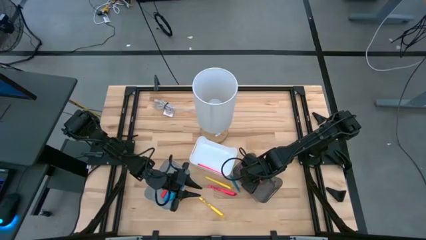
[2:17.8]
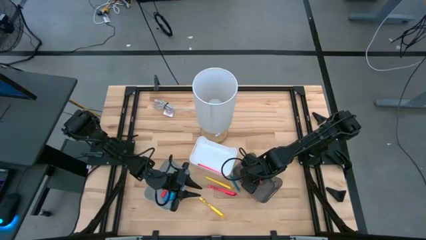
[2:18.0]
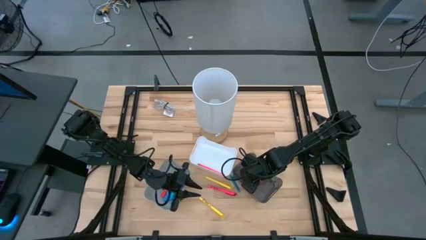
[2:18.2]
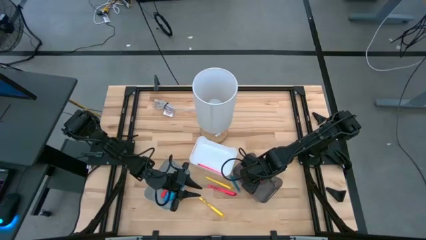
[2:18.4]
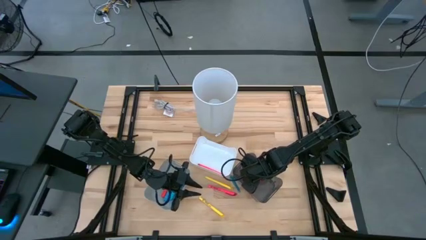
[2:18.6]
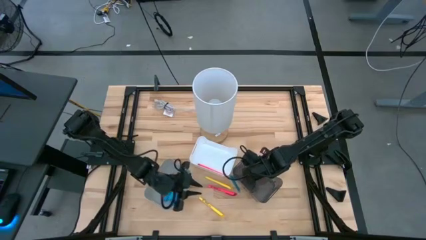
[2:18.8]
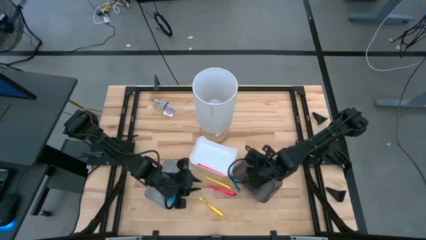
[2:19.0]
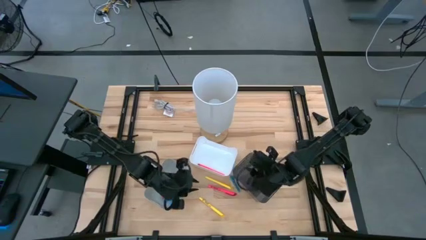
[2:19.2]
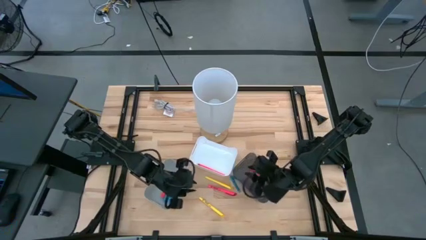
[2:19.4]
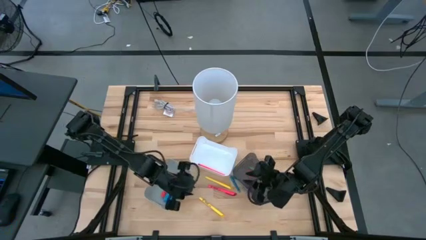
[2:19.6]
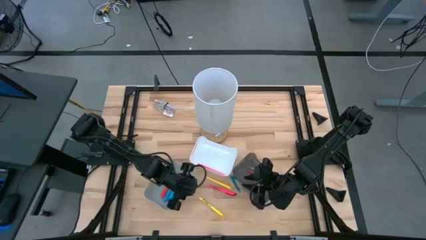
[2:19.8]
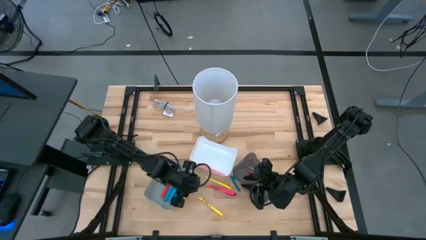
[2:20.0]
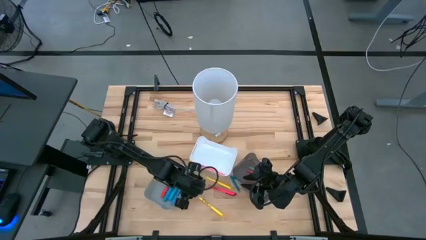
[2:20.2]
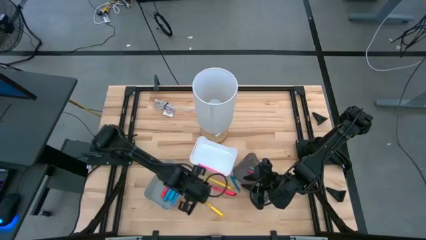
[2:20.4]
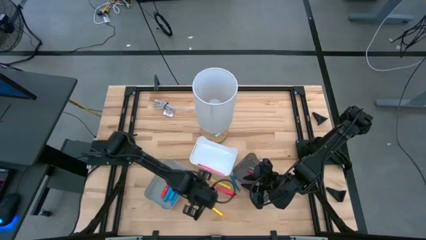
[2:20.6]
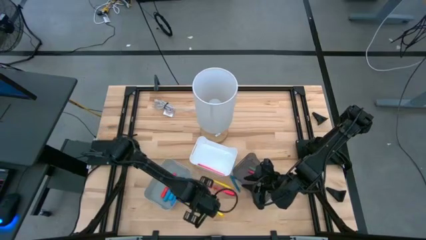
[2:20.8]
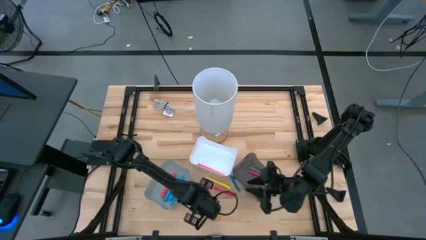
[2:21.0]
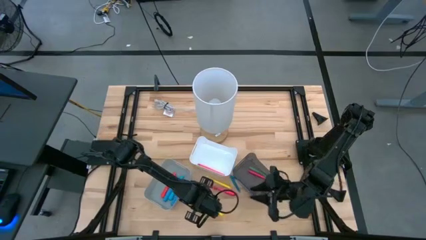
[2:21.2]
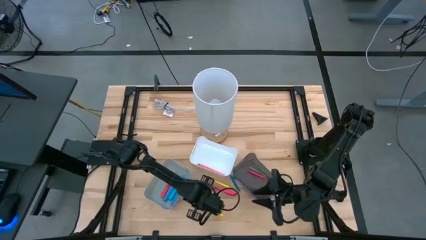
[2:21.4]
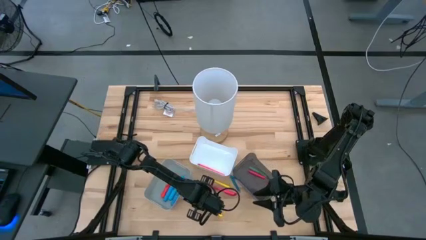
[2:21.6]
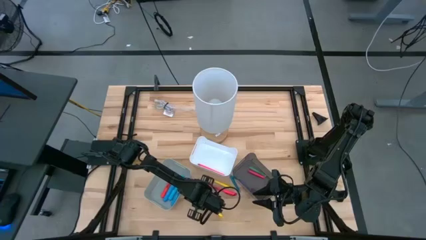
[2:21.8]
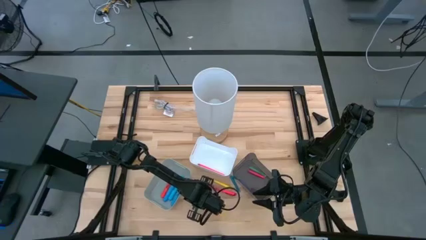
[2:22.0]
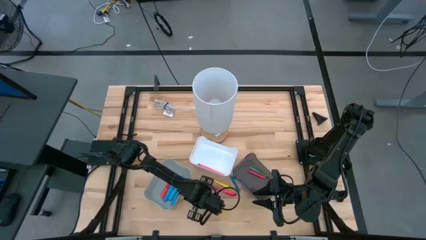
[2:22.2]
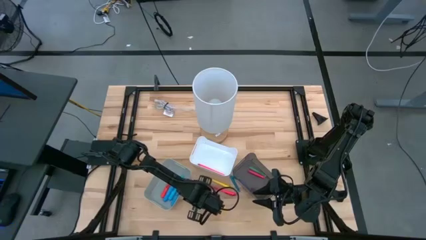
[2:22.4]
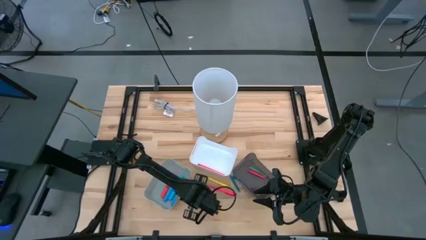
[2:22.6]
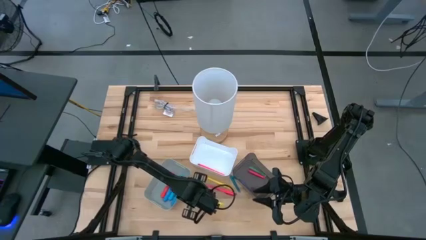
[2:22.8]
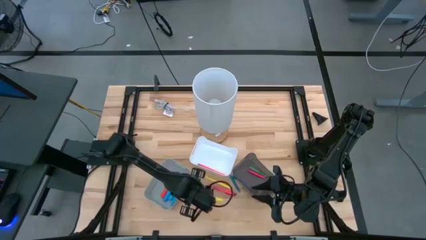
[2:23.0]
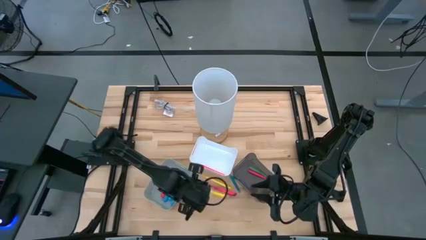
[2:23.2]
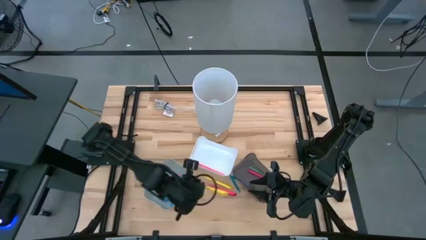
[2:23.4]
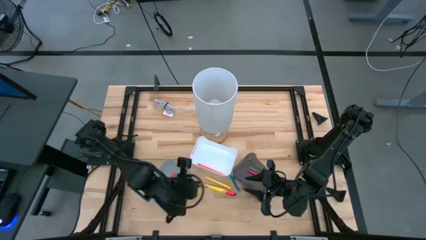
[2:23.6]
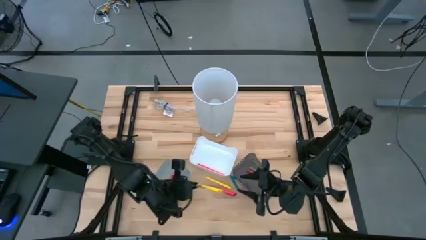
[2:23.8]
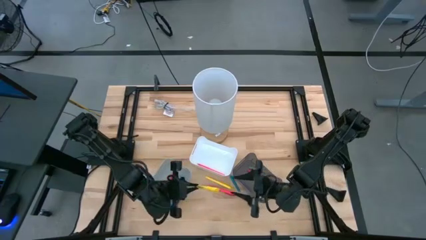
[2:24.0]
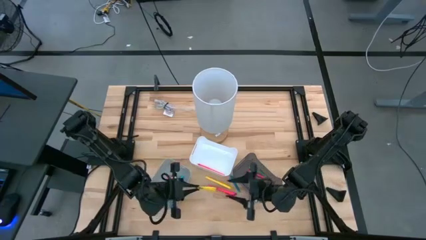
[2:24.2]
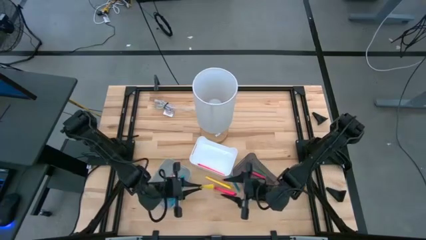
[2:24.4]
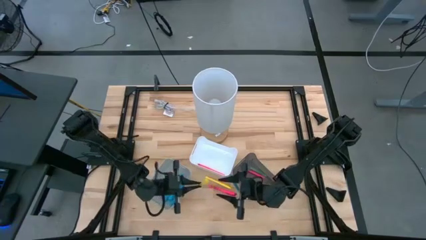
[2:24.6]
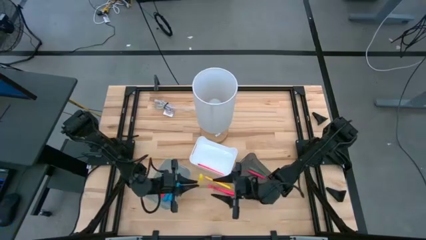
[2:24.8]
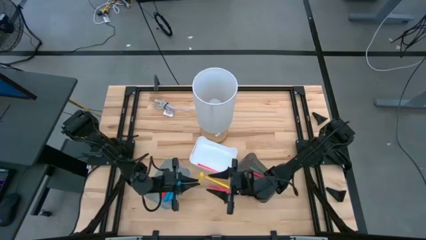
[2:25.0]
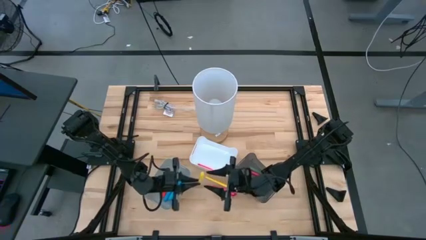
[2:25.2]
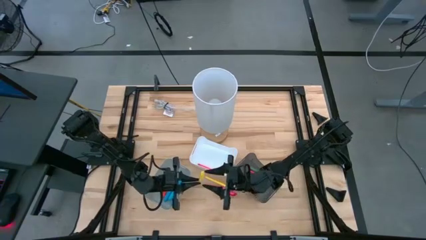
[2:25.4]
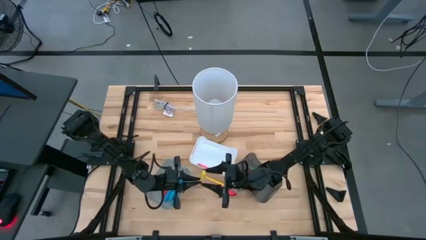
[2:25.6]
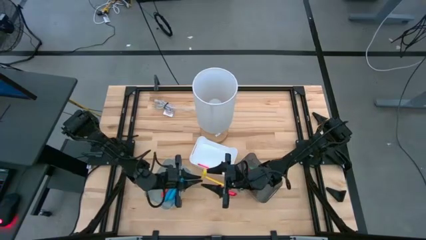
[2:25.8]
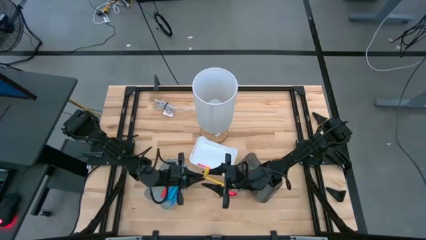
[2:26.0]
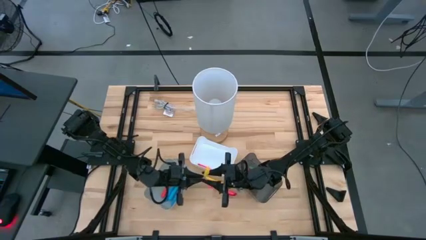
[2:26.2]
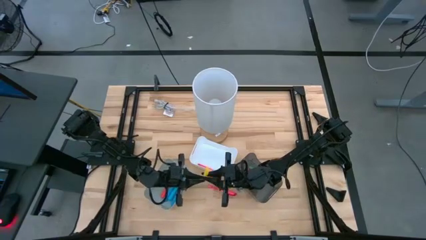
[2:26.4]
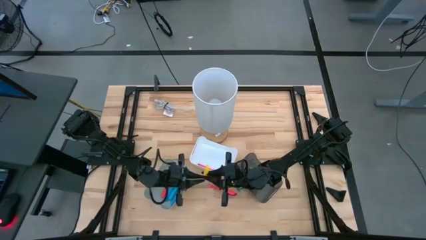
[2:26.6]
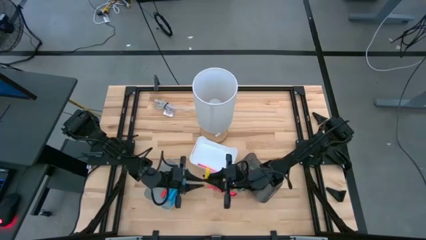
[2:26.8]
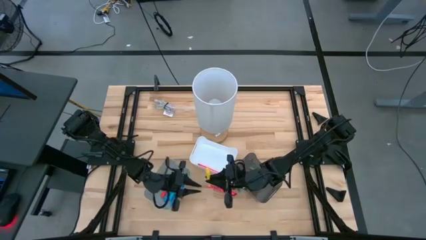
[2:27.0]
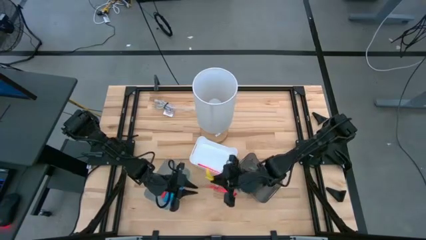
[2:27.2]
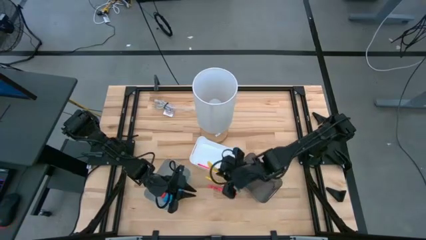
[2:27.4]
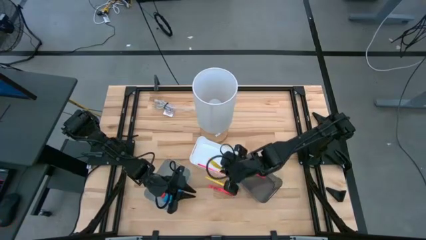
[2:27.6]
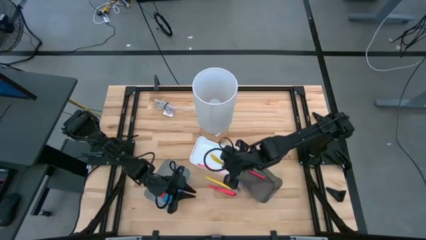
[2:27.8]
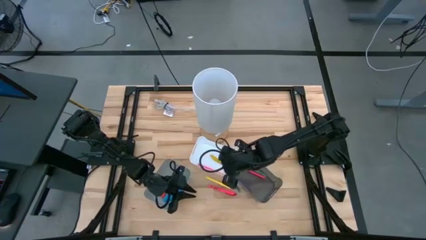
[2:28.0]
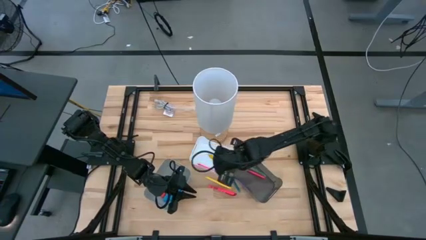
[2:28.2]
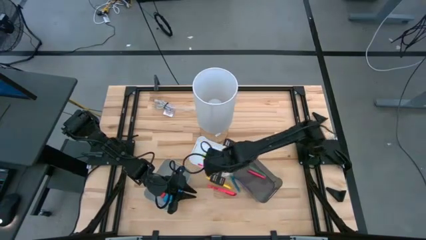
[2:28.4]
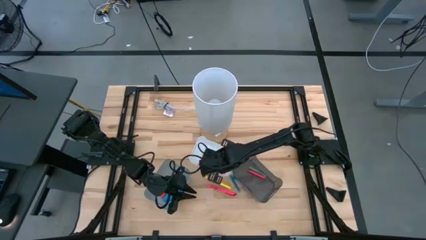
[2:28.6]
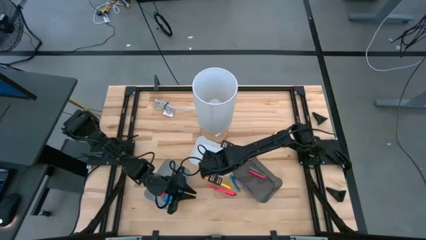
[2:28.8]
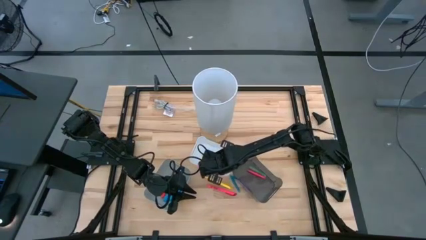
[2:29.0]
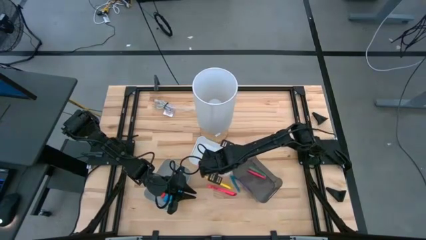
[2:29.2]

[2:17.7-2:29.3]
Task: Pick & Place Markers
Put the bottom yellow marker pen in the white bin

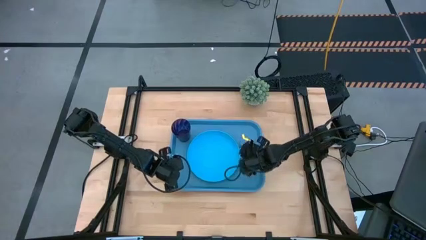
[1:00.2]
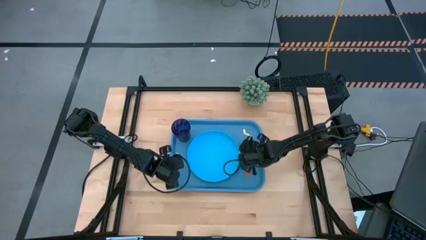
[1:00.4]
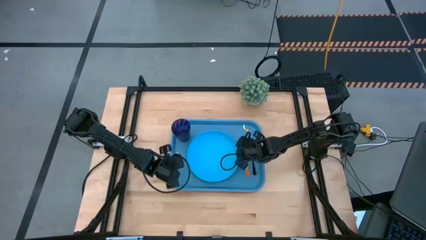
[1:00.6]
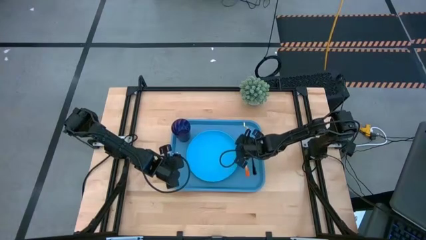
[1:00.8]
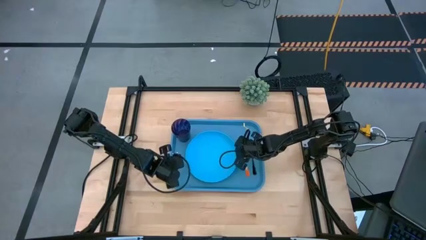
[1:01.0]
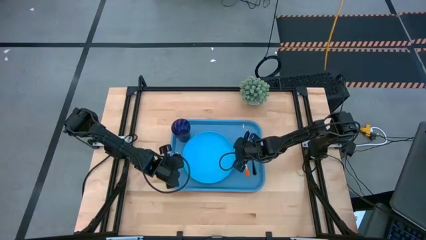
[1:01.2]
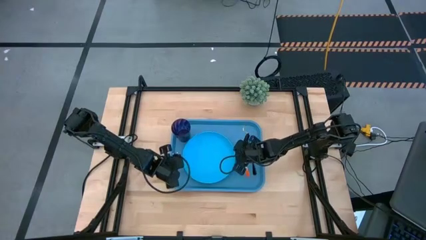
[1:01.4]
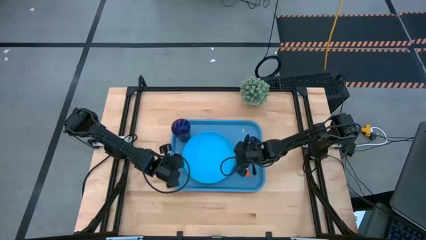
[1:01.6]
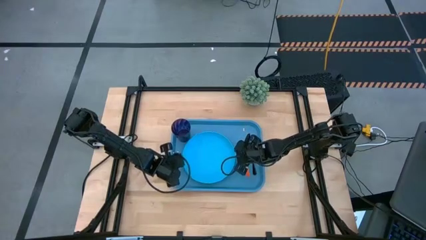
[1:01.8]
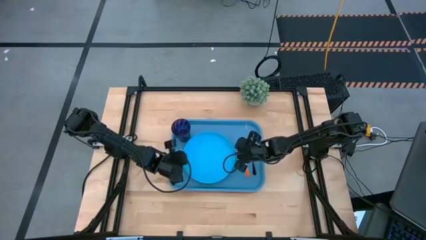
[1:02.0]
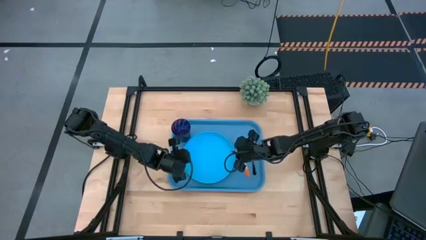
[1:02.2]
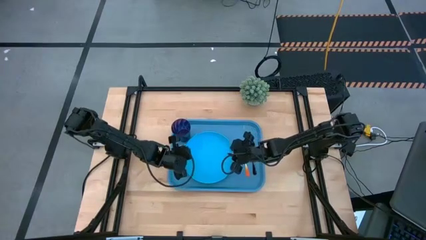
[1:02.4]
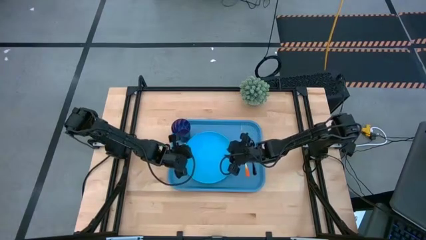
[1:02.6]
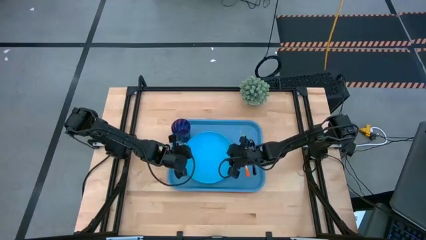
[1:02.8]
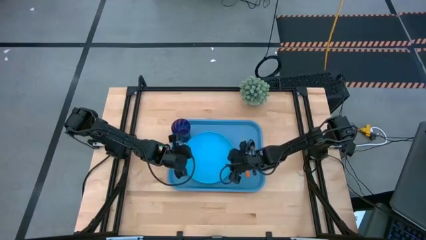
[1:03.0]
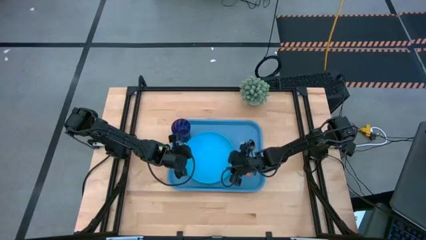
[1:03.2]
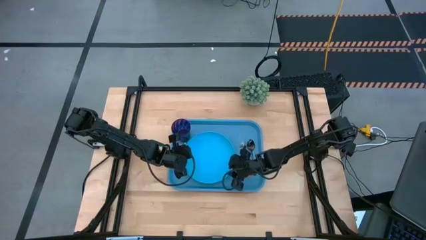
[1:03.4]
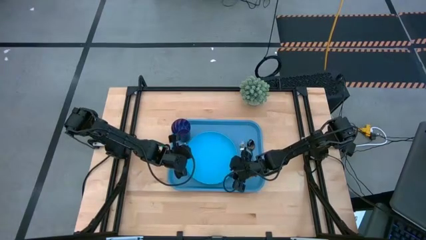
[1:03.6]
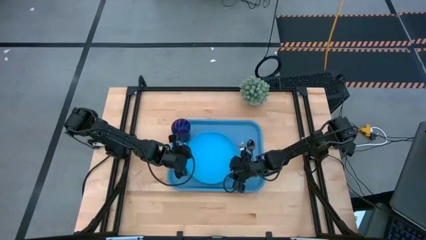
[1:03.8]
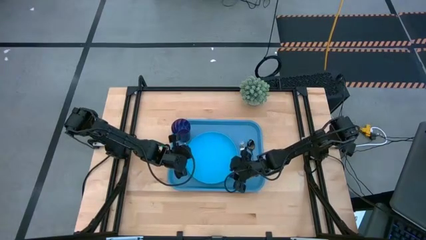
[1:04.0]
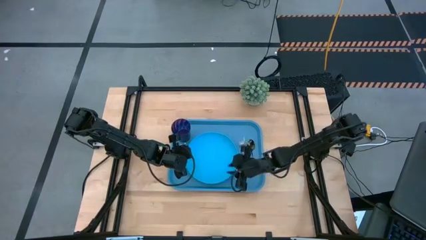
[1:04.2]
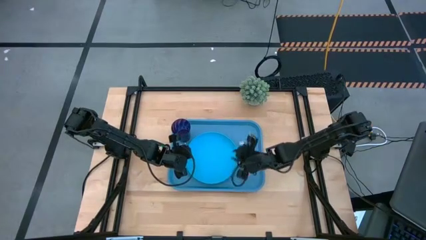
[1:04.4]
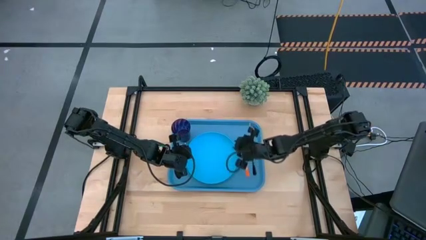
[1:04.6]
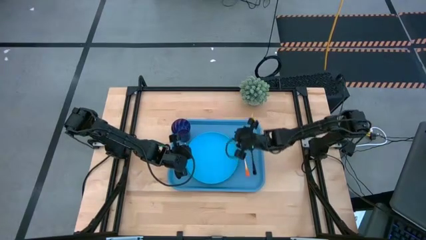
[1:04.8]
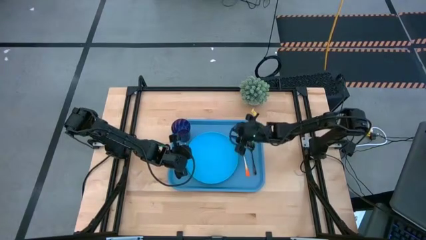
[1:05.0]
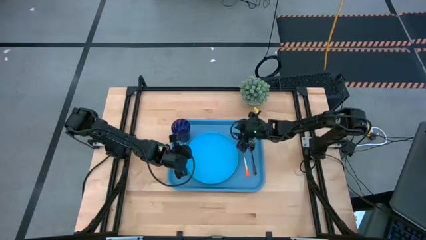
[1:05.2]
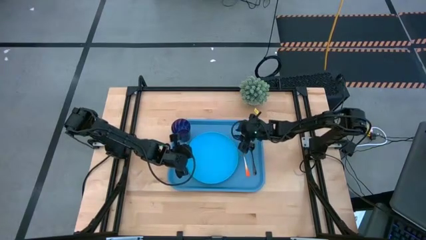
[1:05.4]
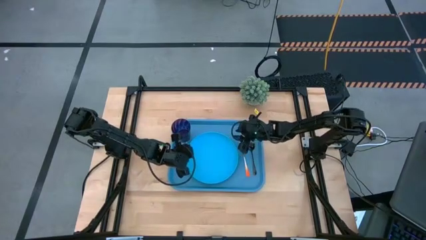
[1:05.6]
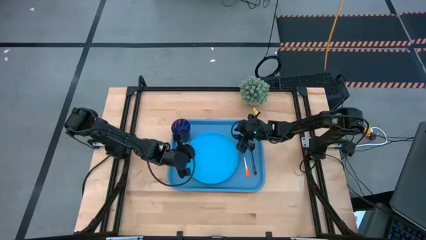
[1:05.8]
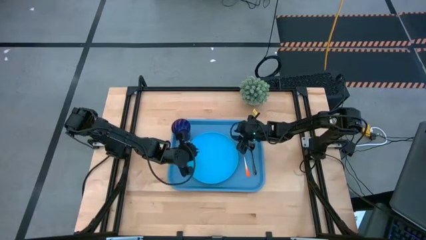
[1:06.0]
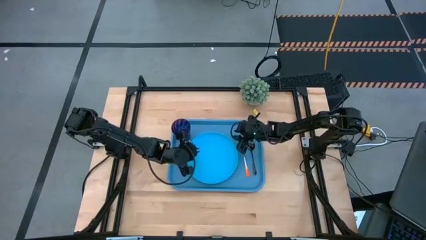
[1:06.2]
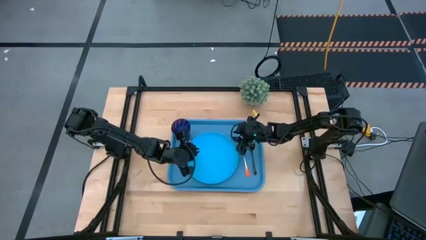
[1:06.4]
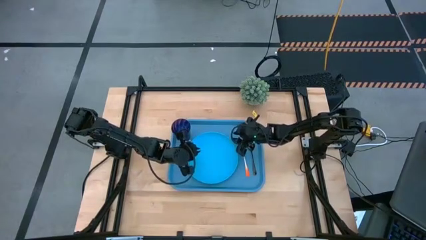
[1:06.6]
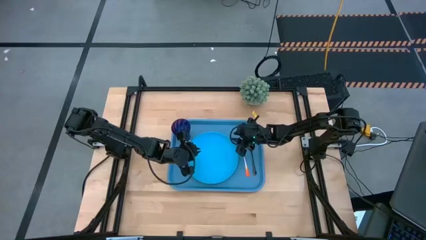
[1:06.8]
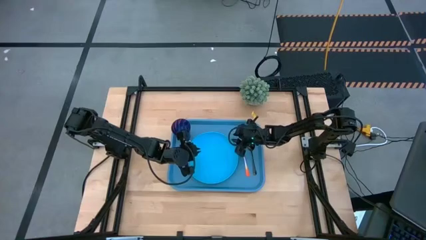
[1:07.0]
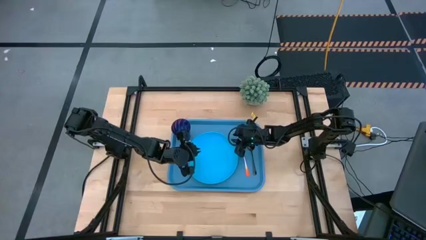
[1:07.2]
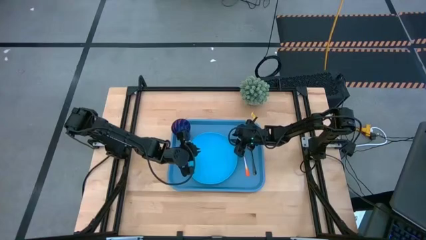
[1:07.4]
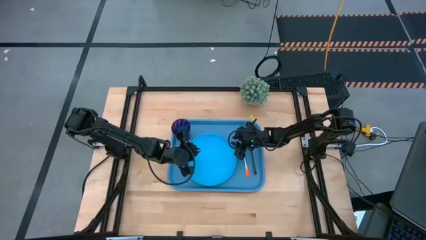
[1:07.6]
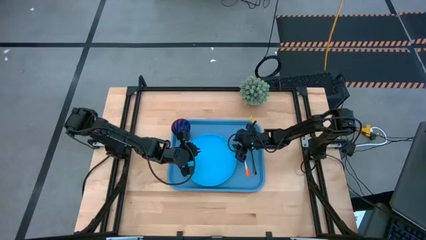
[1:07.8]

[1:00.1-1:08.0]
Task: Pick and place plate/cup/fork/spoon on tray
Adjust the blue plate
